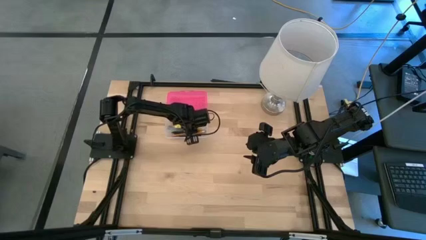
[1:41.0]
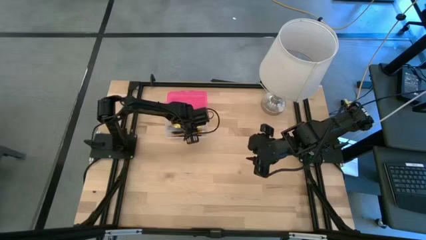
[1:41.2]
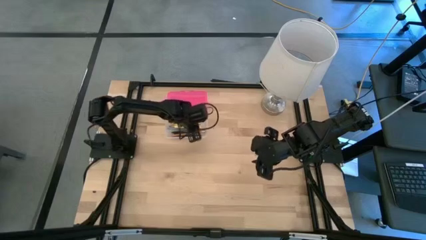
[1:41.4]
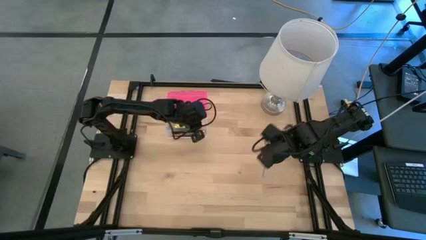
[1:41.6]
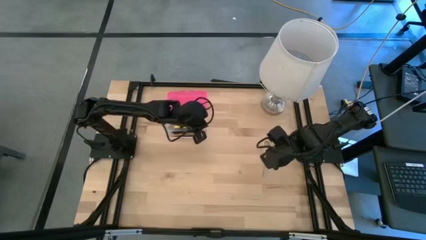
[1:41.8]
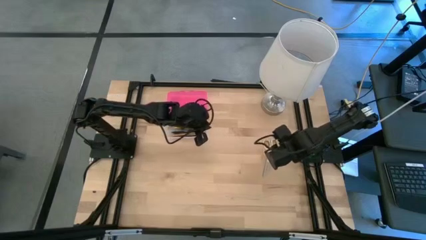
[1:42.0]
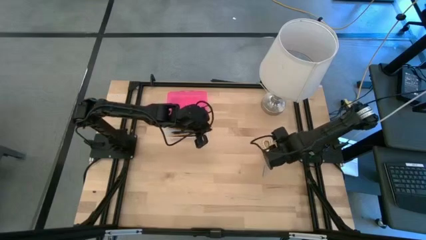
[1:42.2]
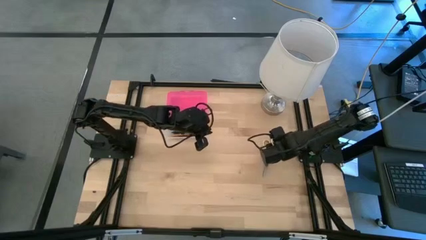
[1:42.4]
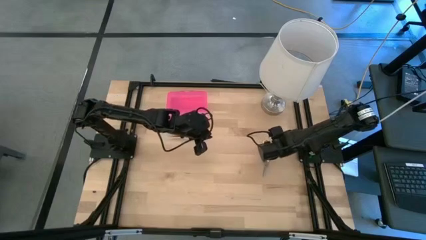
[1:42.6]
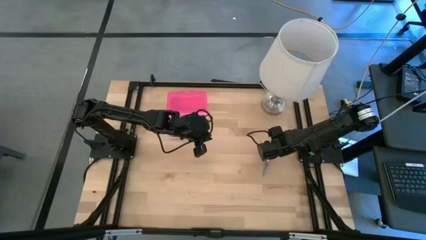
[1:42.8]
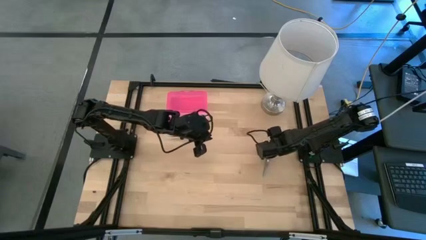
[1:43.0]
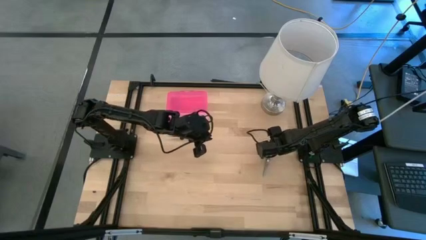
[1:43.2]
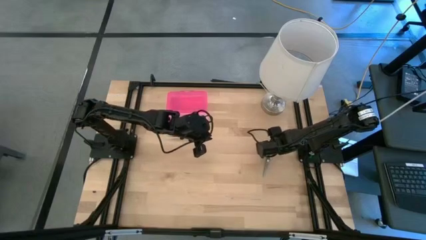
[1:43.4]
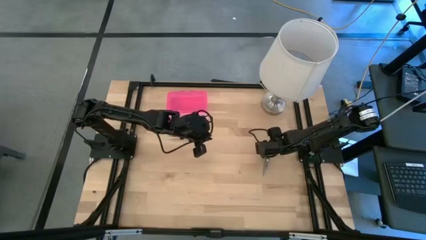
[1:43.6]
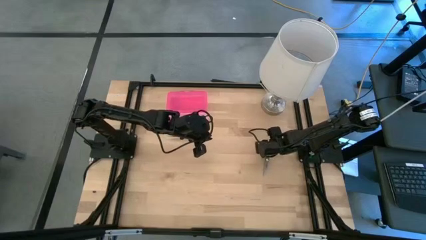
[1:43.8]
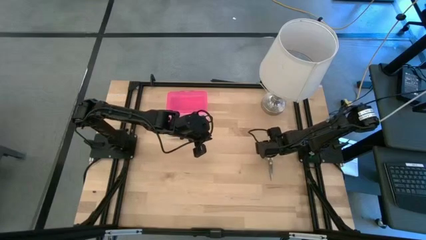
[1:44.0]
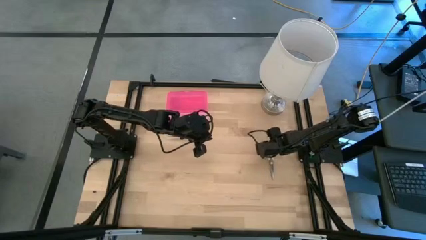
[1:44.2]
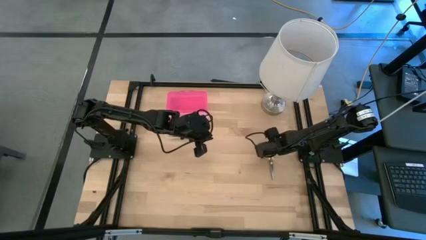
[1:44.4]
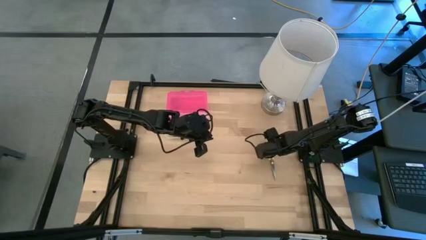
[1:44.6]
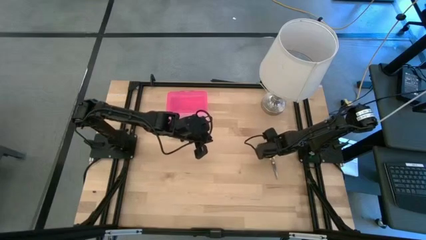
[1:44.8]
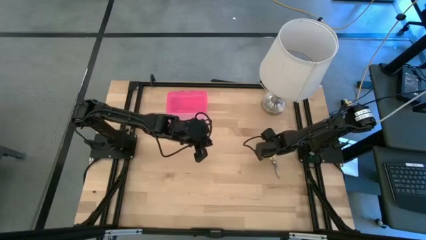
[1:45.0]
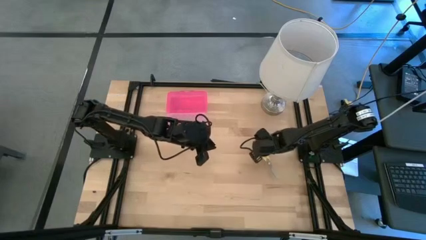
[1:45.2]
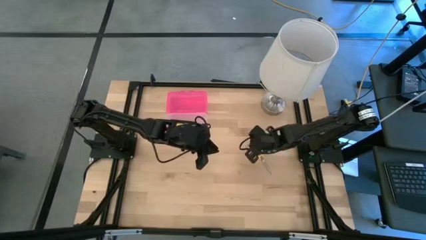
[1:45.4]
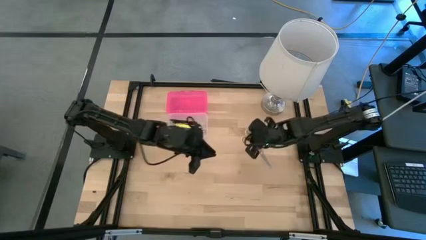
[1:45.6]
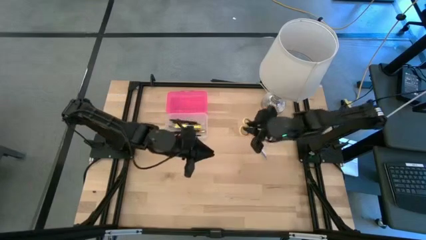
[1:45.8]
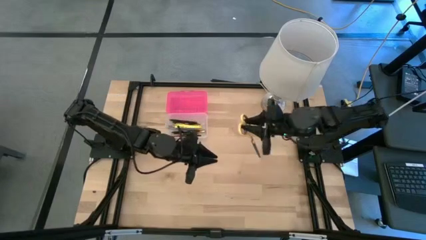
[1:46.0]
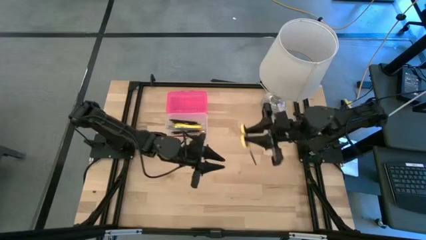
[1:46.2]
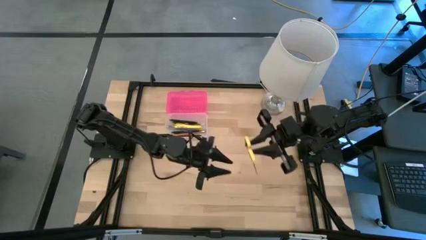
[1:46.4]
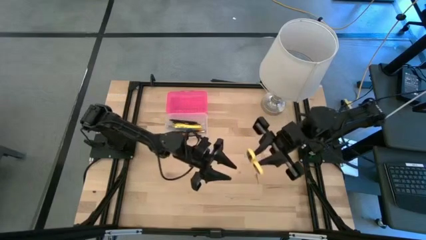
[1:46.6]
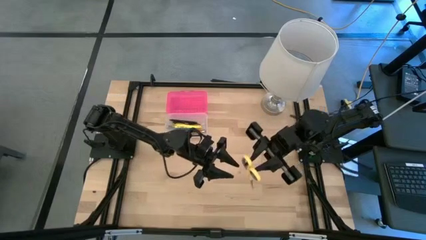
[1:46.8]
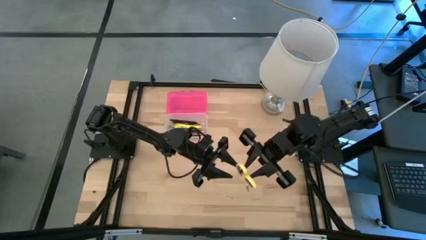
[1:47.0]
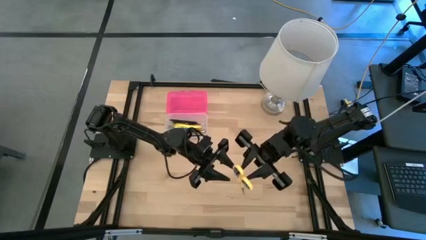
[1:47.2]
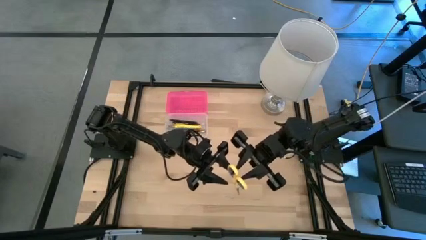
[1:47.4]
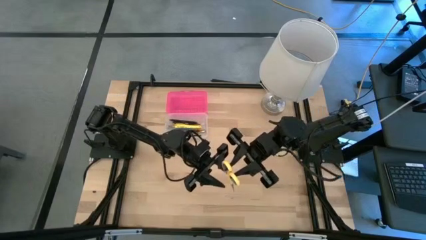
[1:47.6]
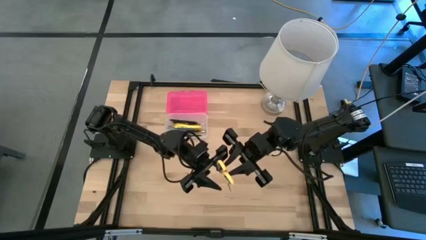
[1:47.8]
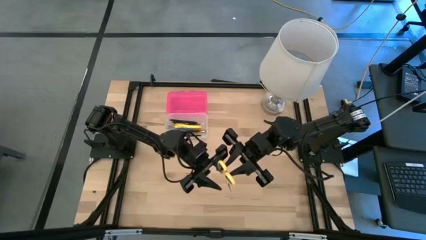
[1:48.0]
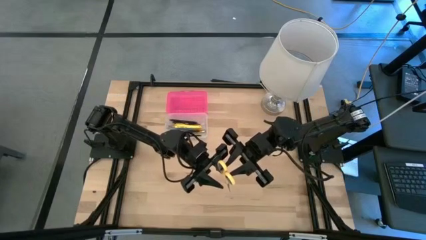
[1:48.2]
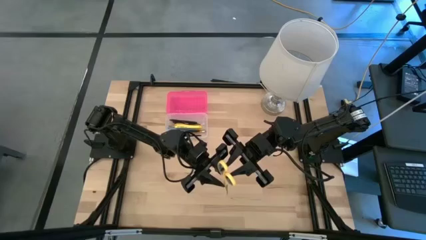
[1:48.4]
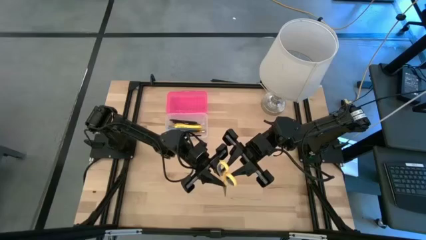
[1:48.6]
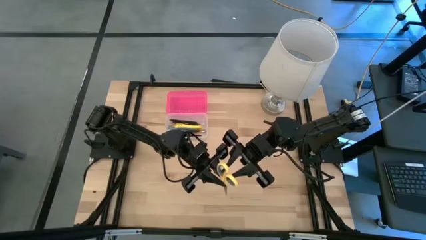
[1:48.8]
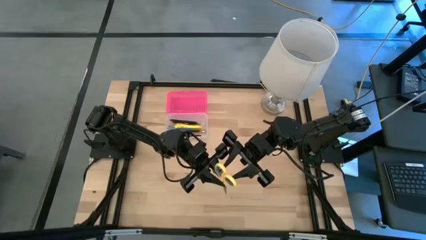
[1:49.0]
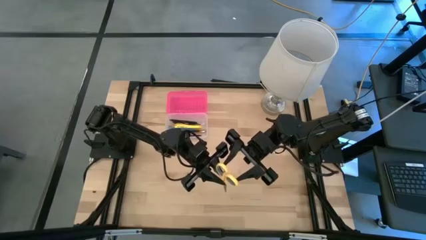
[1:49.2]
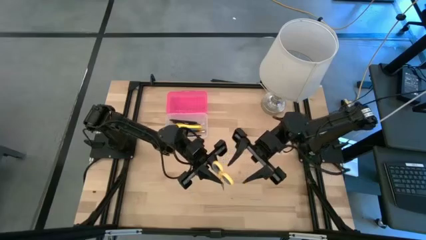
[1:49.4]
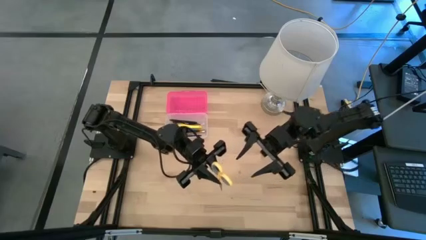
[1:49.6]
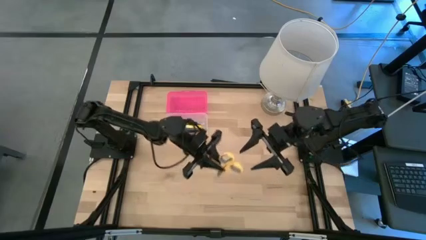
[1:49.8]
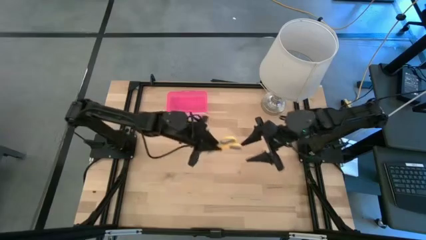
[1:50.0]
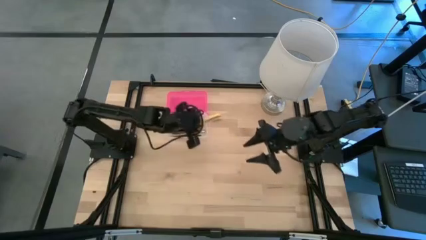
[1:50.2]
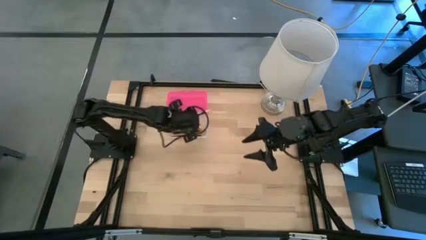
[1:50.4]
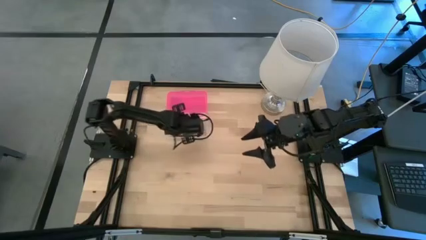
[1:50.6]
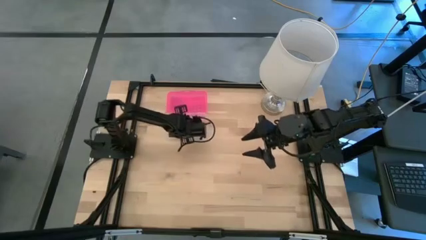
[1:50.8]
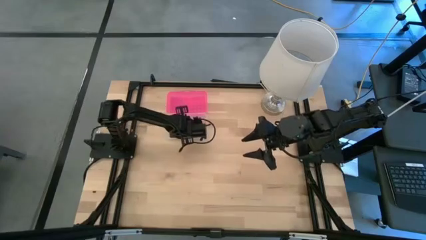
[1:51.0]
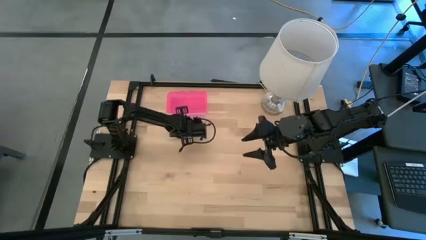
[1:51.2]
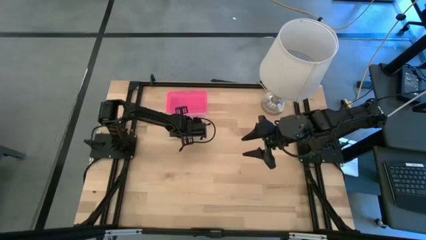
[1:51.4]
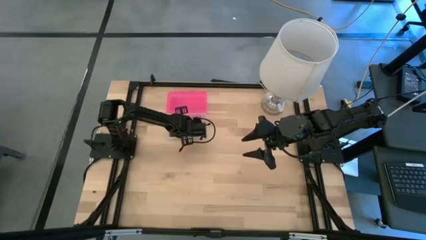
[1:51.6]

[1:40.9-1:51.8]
Task: Pick & place school supplies into a supply box
Put the yellow scissors into the supply box

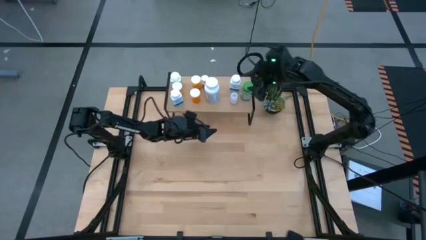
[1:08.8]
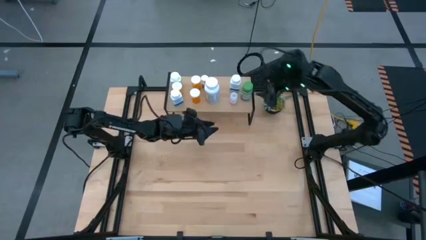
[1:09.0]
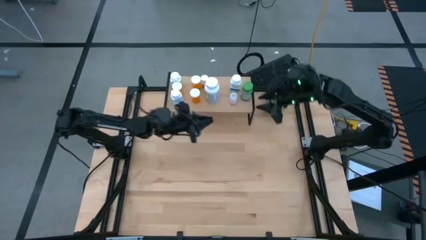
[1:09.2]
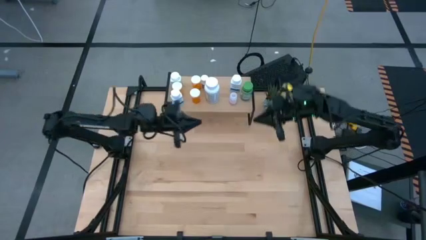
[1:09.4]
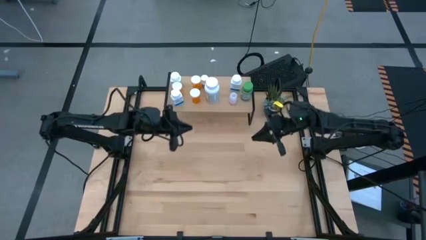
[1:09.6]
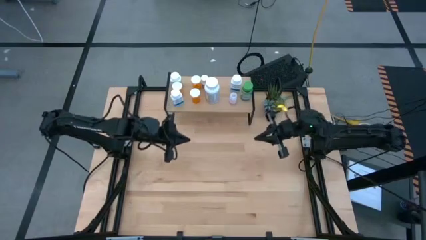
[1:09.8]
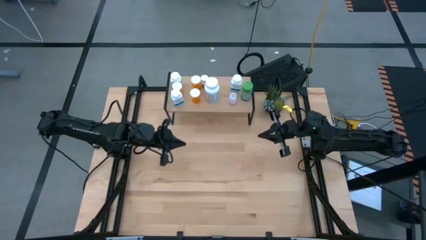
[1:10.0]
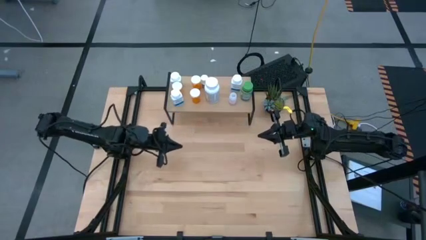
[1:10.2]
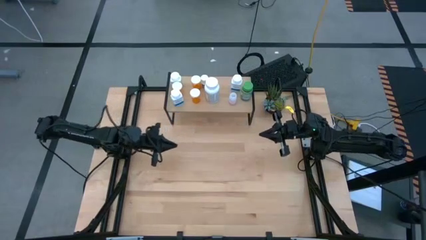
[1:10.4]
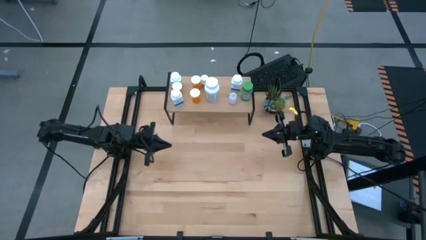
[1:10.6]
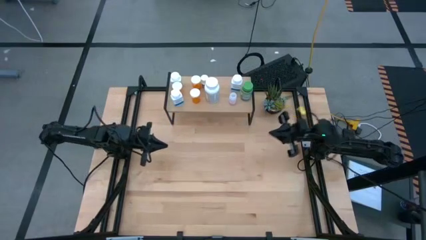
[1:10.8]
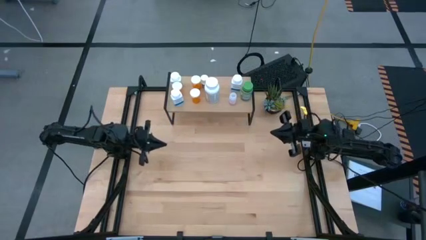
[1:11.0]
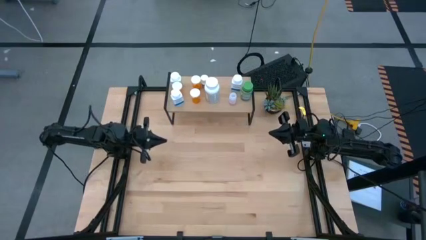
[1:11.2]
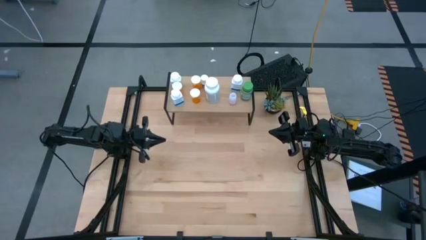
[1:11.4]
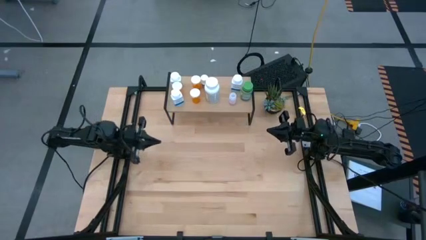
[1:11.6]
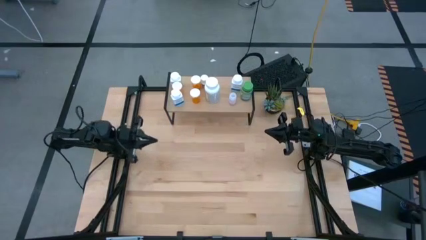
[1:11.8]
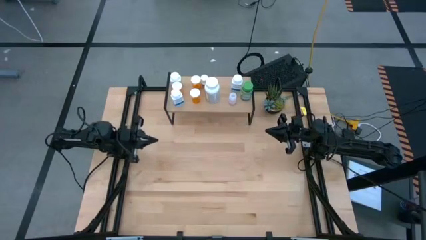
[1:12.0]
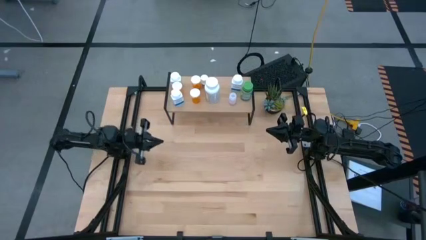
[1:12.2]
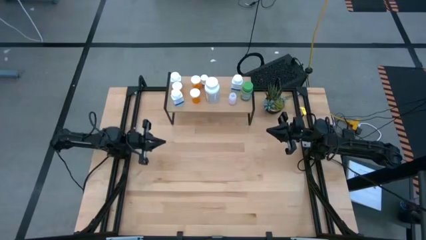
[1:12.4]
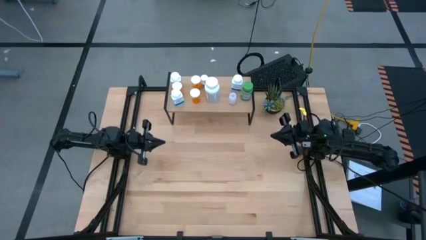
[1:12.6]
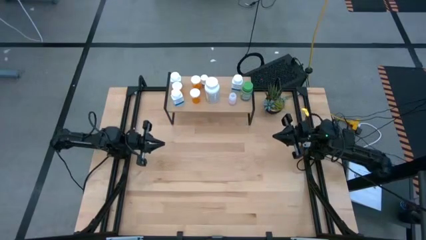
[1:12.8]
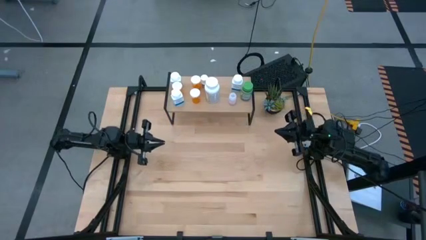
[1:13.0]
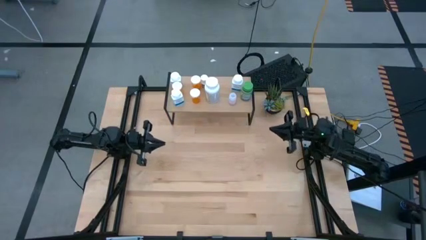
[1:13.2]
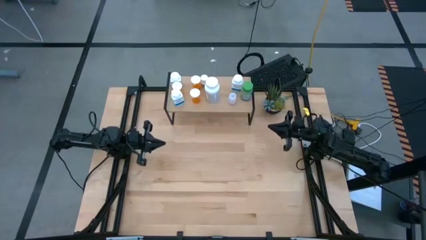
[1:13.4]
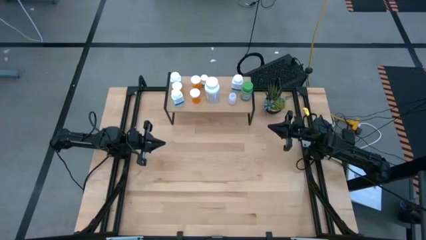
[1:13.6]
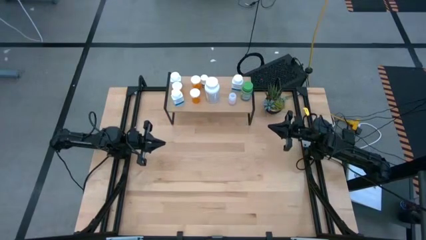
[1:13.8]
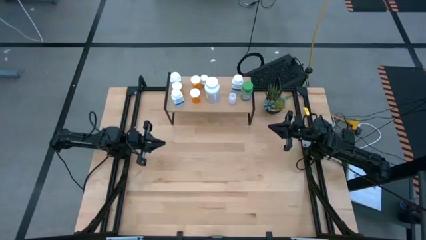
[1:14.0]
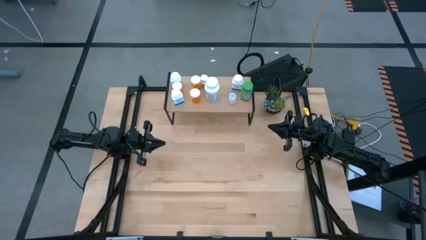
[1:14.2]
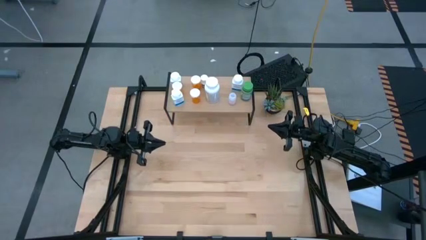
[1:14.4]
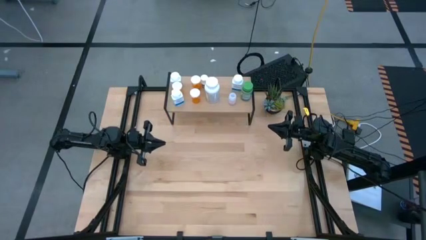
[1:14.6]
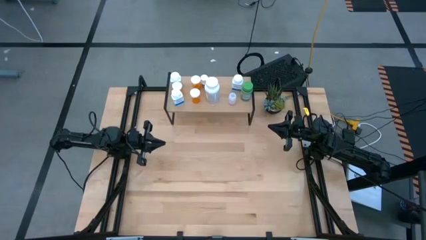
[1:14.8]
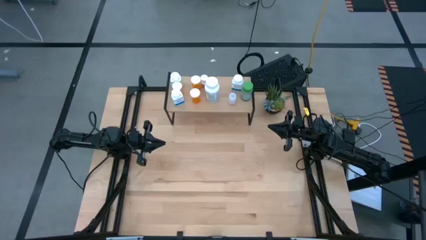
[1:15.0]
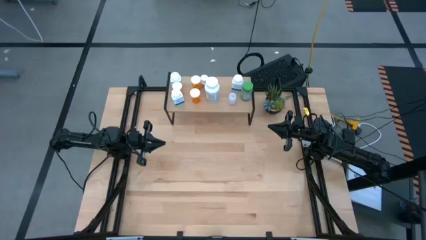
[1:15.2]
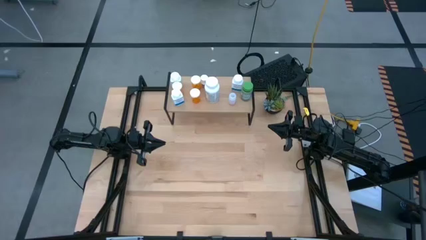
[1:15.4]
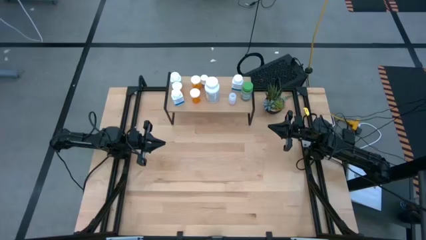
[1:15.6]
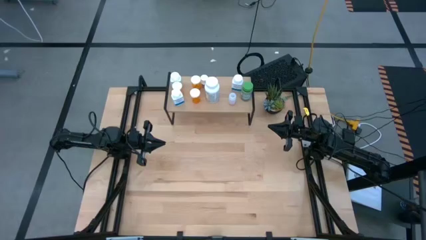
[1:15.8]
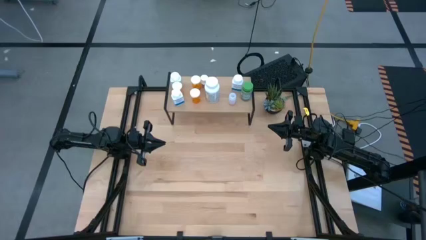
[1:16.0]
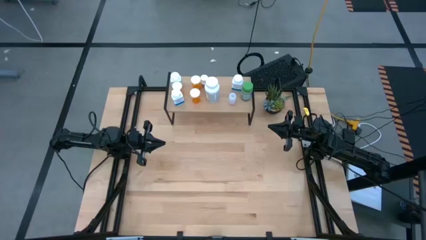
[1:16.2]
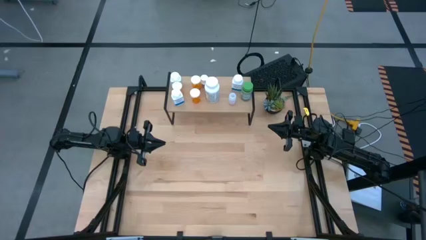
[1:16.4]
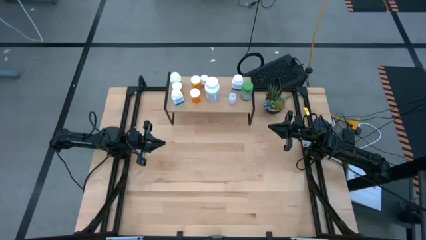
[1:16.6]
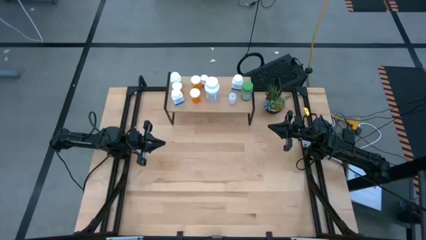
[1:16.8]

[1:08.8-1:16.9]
Task: Pick and place medicine bottles onto shelf by color
Return to Home Position
